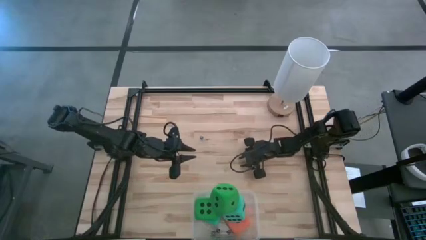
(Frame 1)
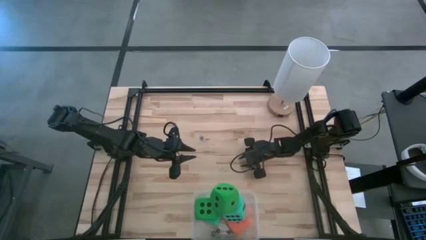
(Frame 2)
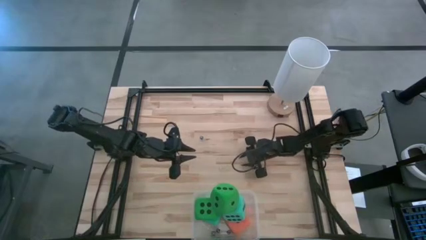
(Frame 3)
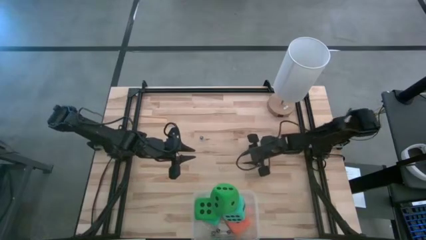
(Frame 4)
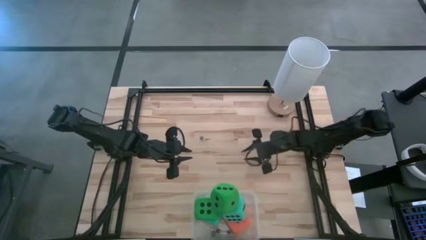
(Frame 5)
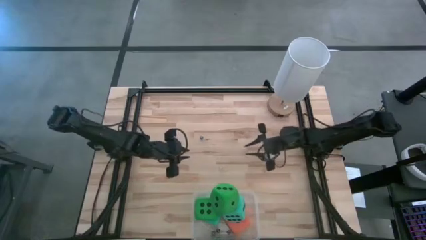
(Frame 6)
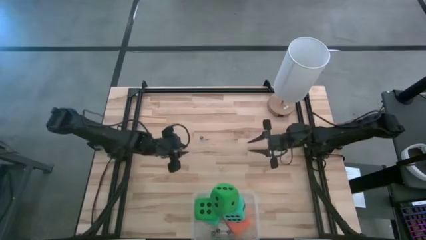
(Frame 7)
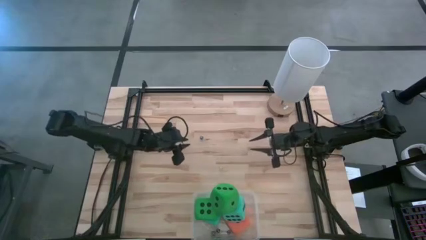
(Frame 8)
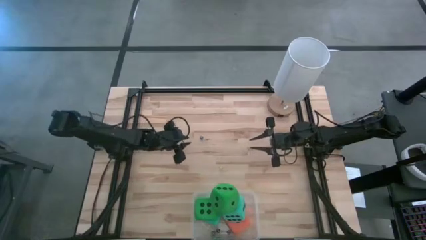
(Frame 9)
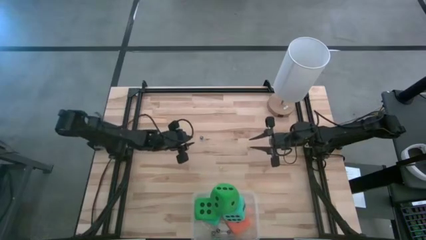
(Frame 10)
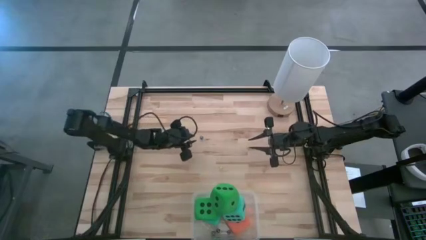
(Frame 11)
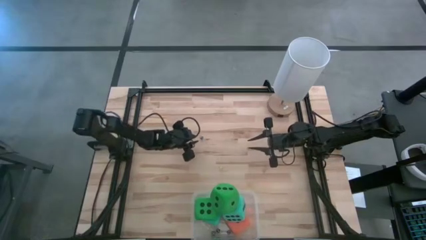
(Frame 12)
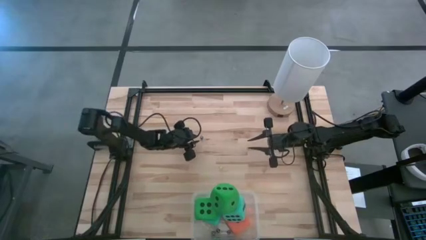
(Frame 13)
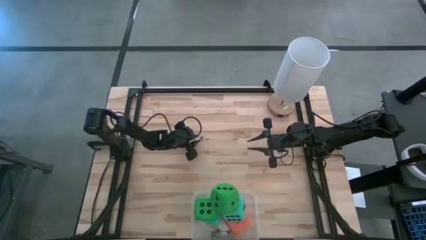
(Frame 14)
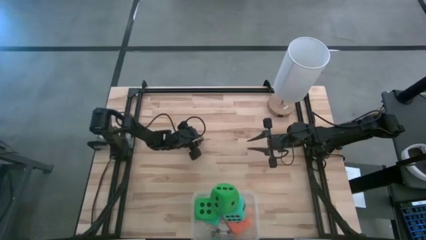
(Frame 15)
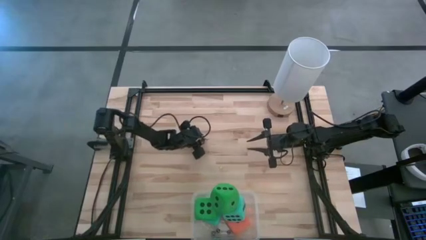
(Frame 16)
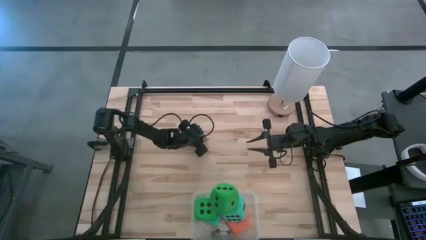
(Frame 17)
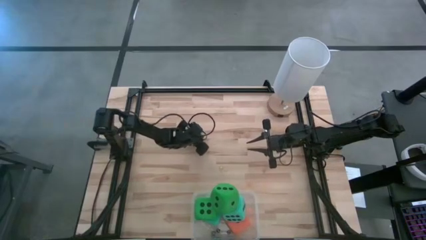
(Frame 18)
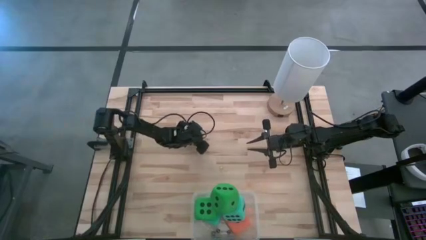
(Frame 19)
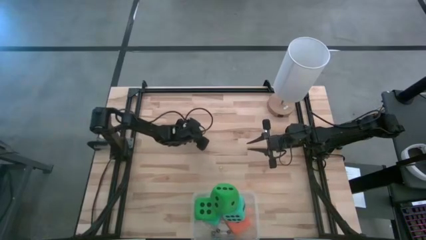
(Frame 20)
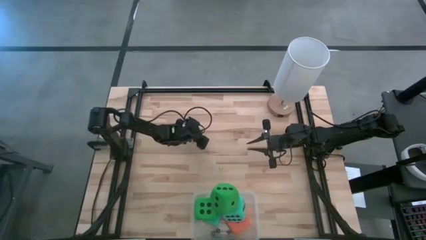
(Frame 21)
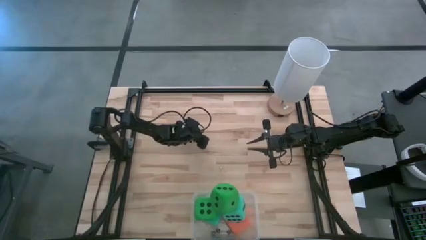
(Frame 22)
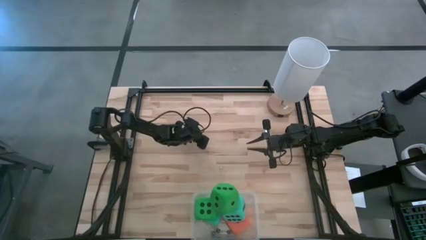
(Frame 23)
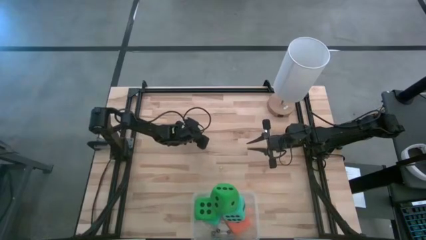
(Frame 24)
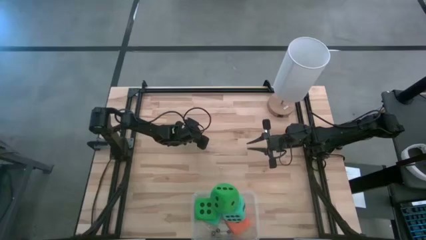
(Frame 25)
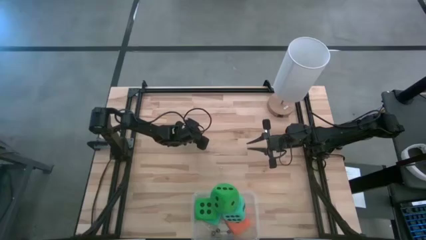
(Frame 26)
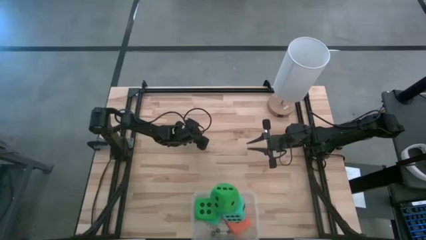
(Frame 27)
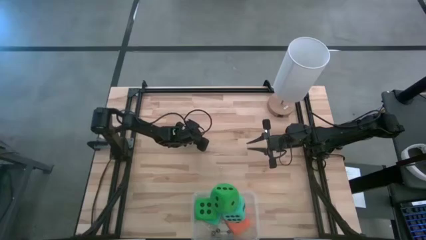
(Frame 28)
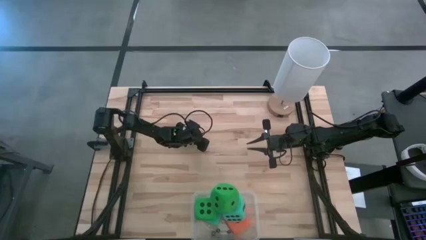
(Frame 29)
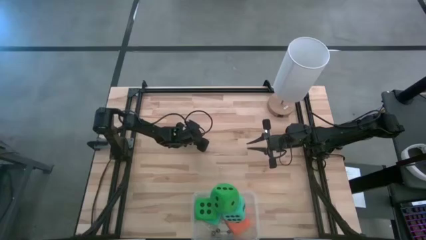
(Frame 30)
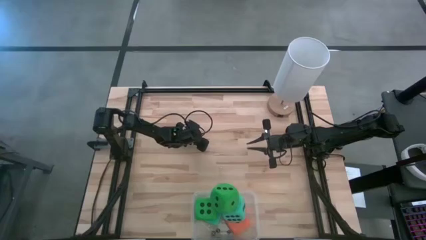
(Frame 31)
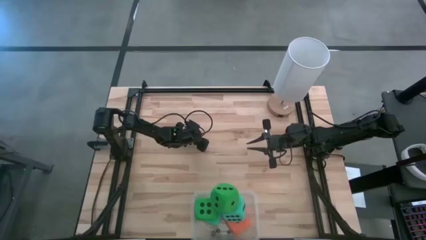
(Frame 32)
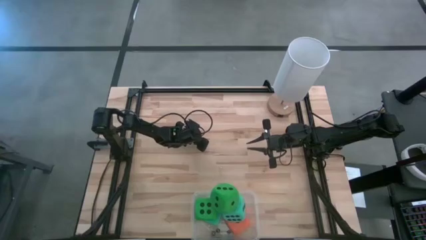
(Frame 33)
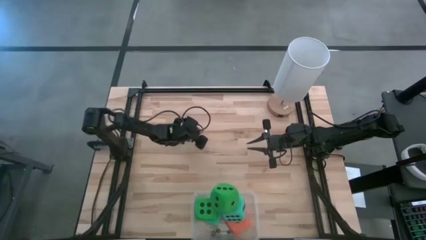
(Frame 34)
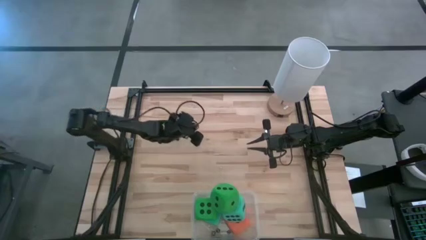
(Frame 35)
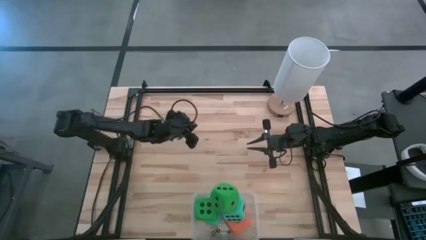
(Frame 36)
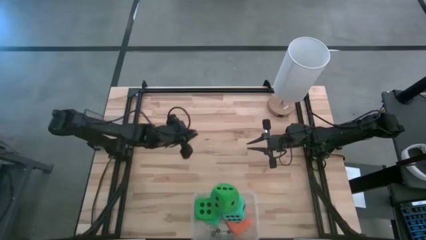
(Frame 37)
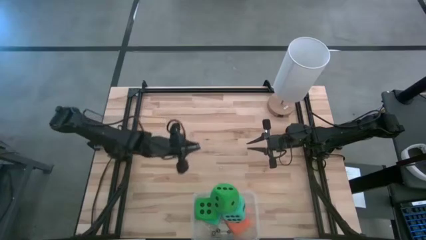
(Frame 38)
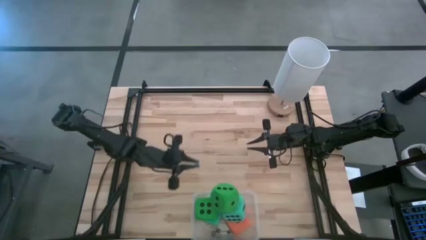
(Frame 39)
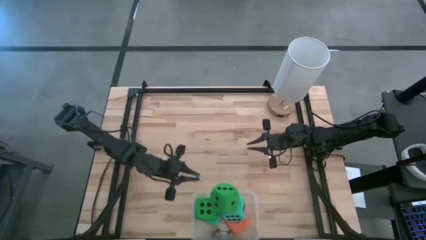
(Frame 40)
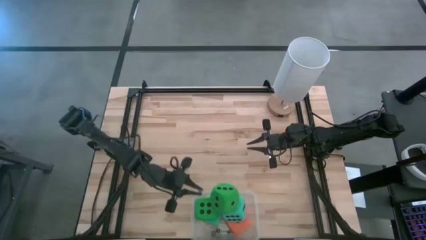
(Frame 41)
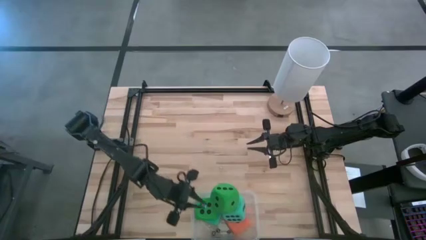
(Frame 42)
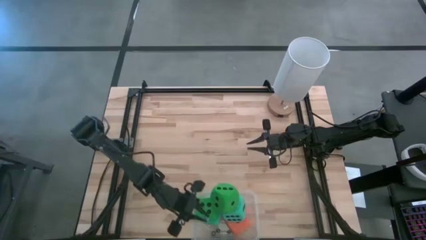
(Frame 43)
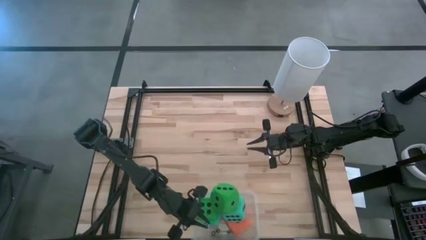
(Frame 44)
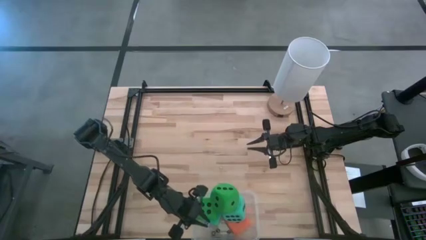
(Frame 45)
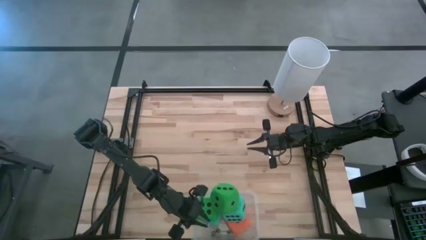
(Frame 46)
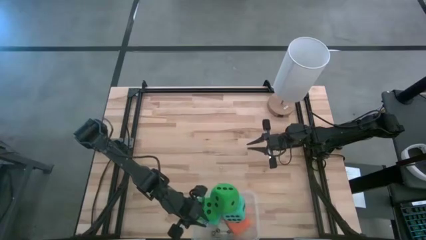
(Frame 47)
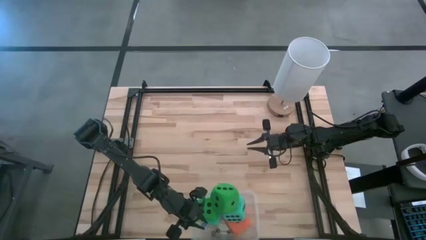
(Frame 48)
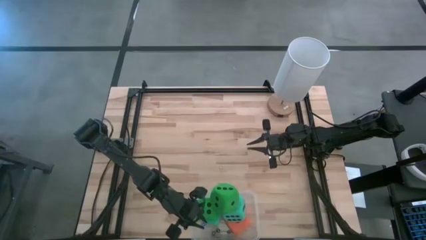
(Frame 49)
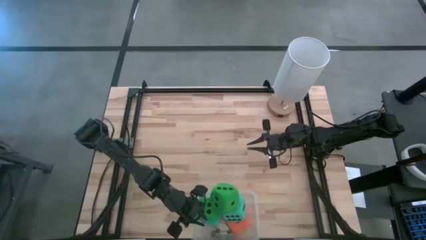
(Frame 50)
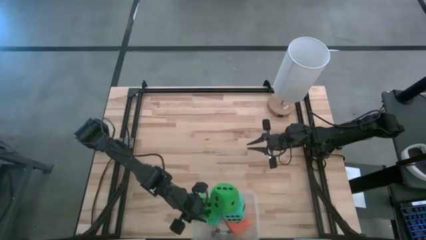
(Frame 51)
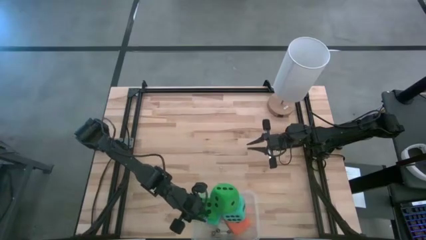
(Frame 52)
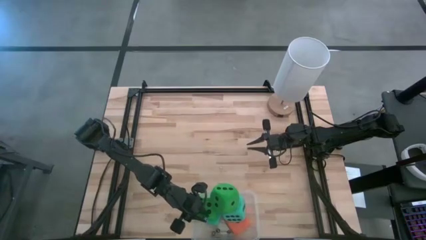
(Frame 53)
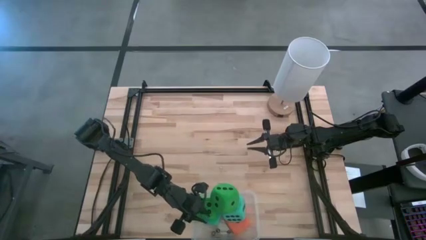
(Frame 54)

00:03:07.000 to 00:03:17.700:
Task: Pick & Place Dice
Put the small blue dice into the transparent bin

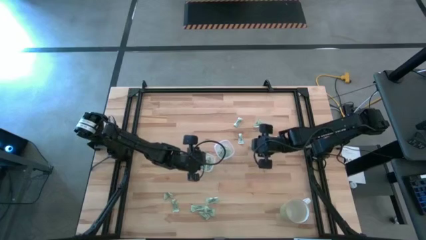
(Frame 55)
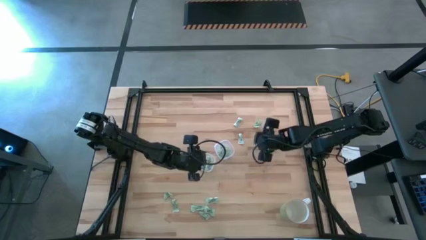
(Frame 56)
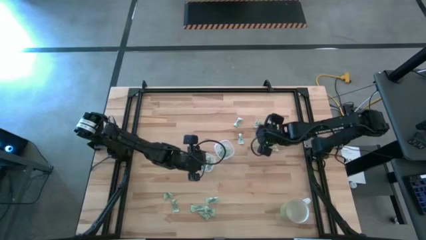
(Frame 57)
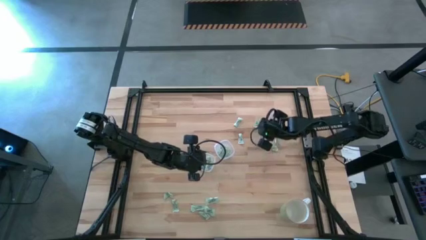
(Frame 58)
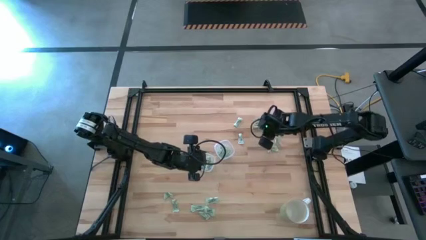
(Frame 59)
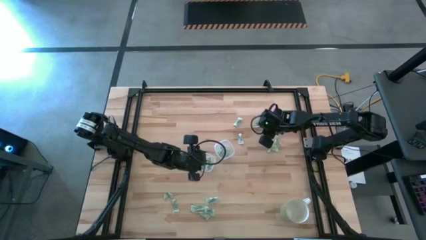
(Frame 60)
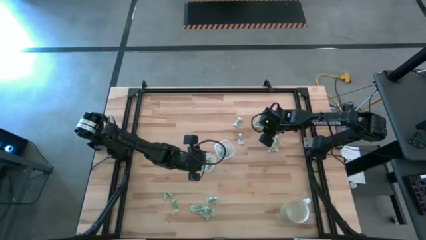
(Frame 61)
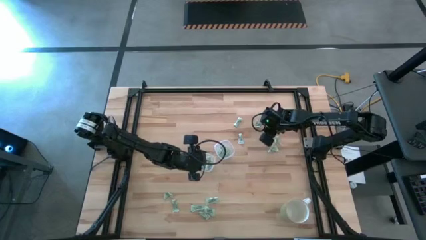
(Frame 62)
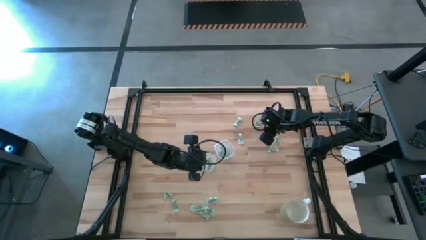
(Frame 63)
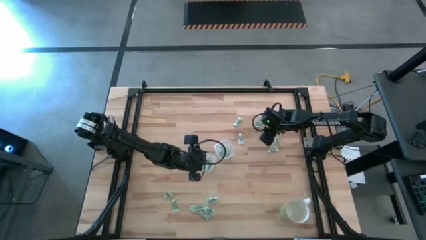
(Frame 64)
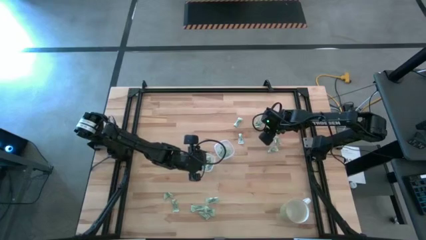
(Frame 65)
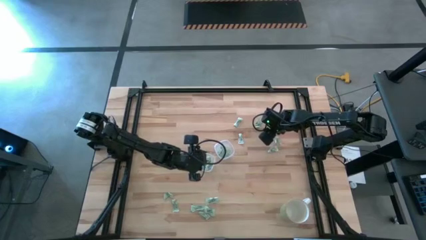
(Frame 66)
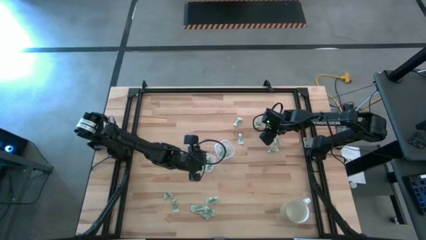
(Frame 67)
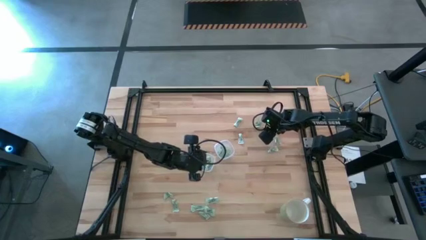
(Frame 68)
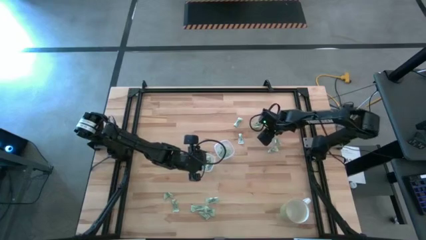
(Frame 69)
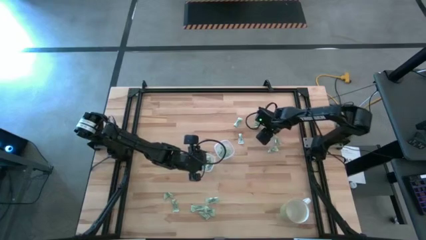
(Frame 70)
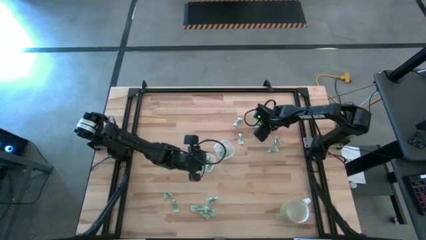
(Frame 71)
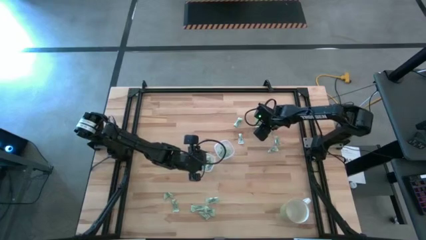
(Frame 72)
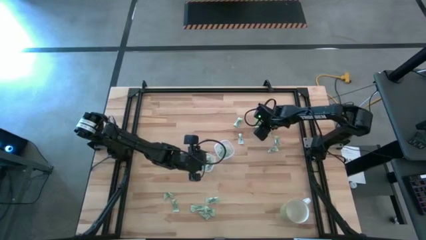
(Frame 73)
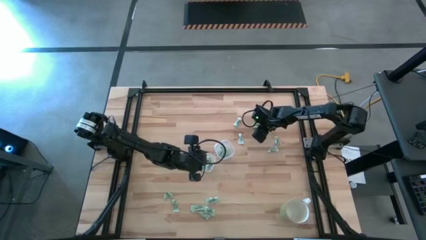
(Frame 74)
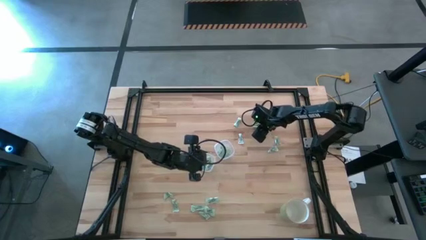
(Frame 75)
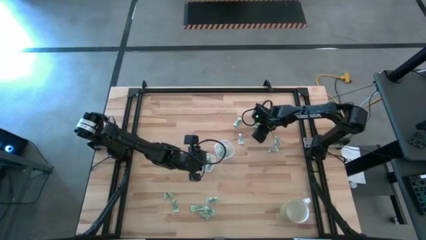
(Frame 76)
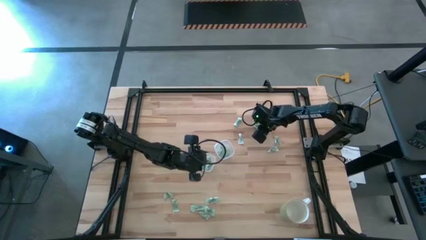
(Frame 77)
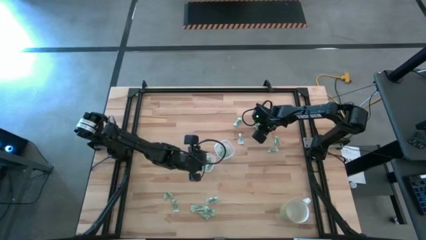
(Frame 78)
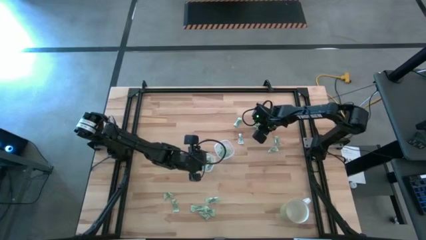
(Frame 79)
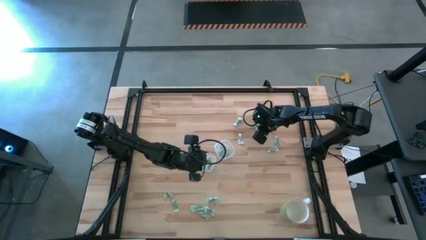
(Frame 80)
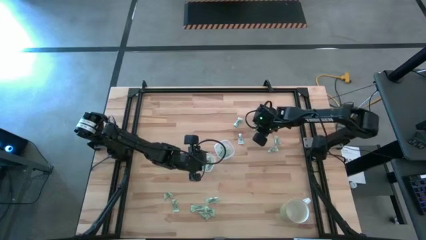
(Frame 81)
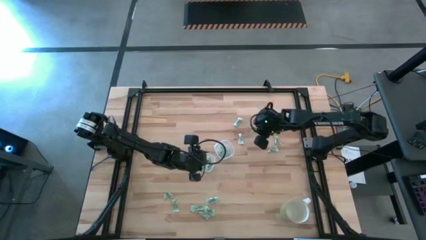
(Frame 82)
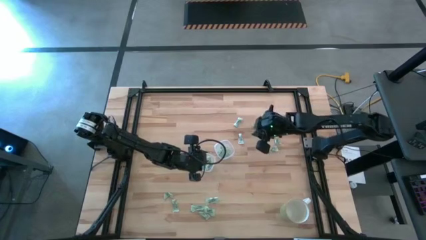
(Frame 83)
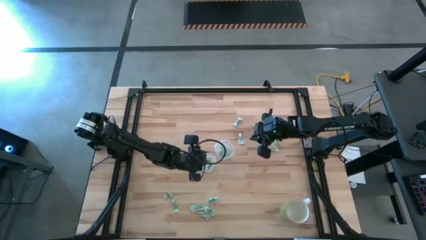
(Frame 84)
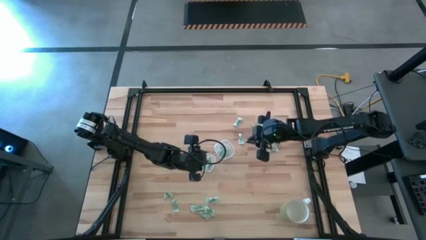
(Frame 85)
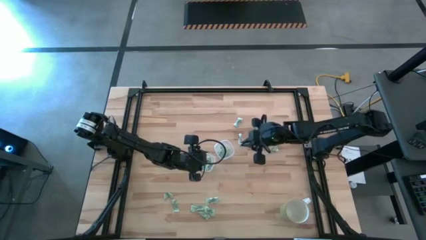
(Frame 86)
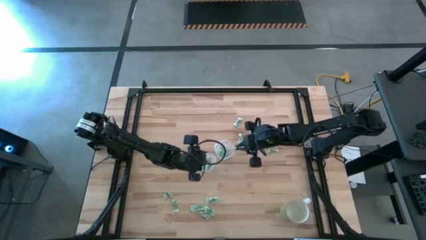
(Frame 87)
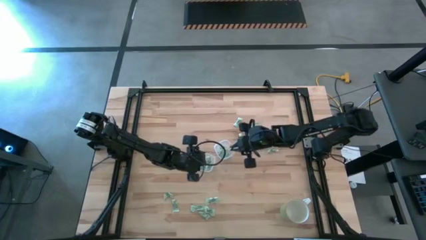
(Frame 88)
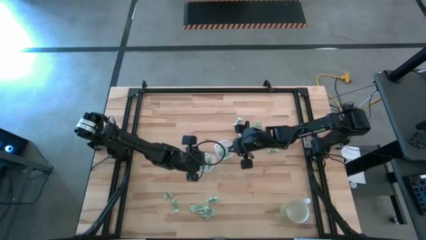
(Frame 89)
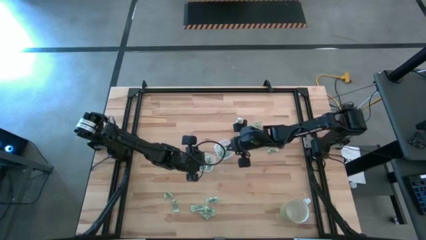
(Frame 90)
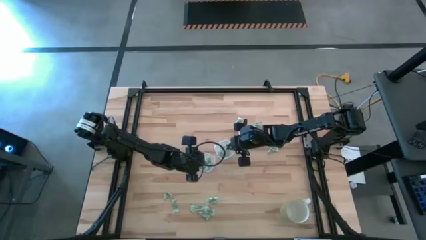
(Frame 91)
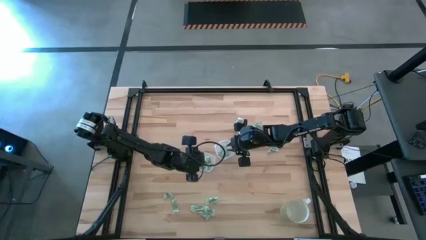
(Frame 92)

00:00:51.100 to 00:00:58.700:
Task: Pick and place items into bin
Put the stevia packet into the right bin
